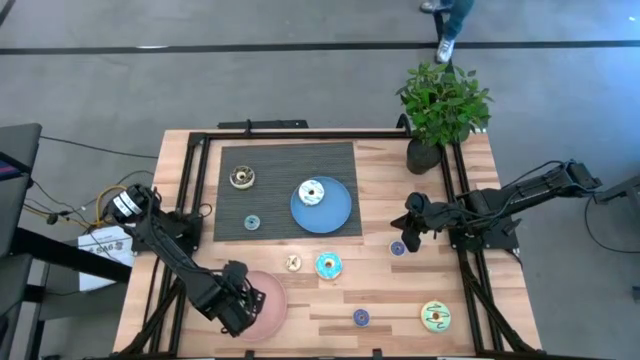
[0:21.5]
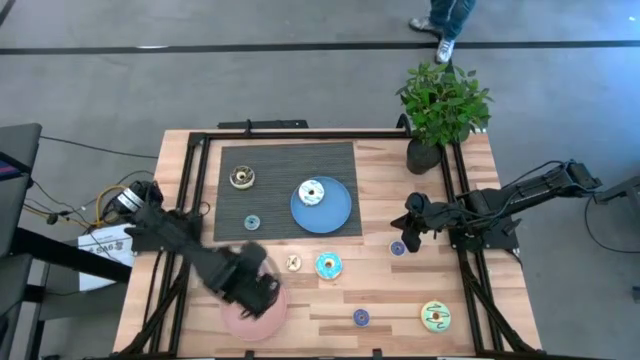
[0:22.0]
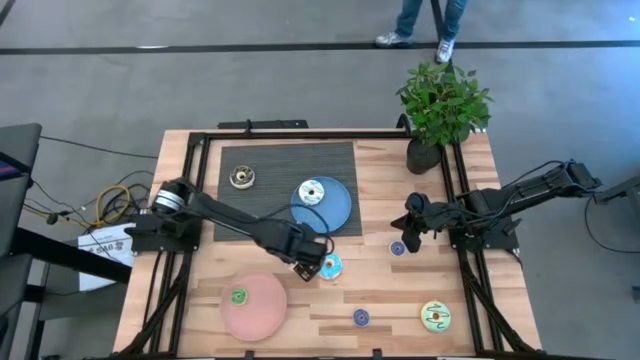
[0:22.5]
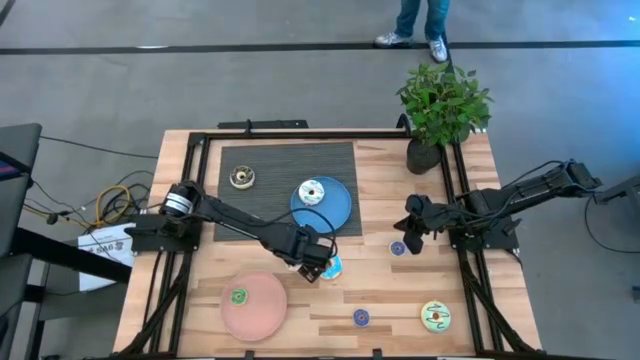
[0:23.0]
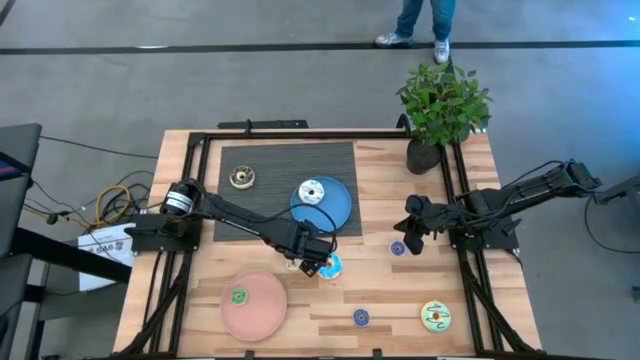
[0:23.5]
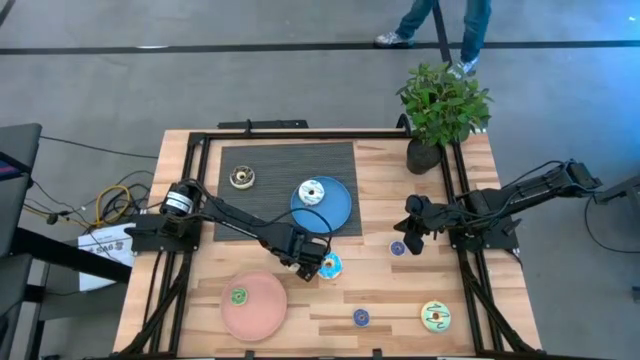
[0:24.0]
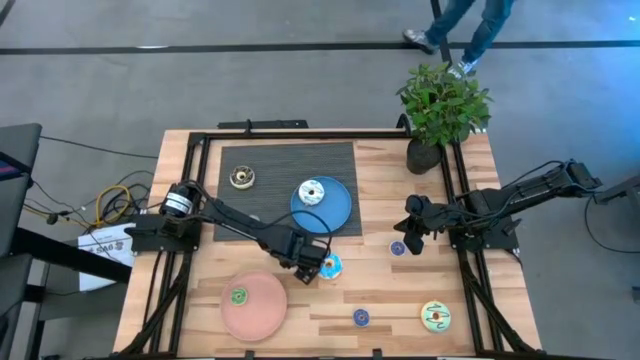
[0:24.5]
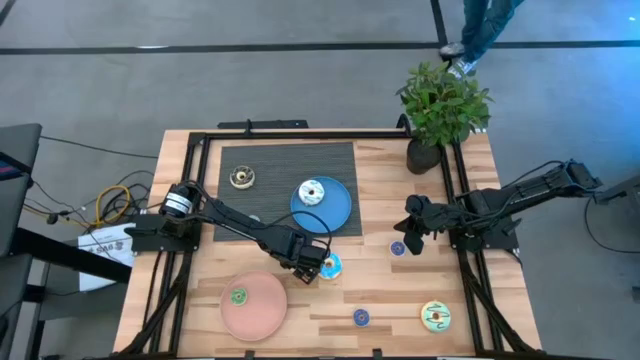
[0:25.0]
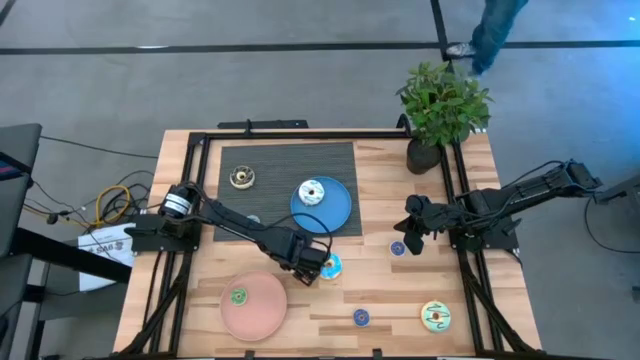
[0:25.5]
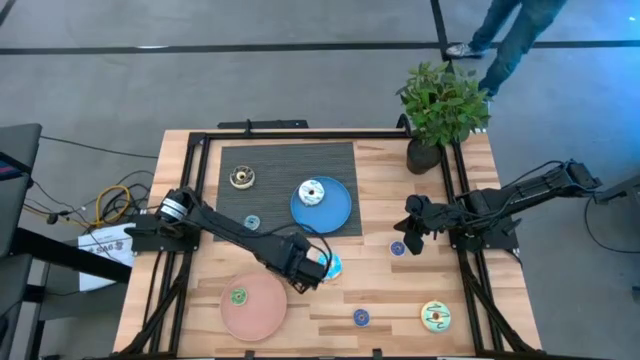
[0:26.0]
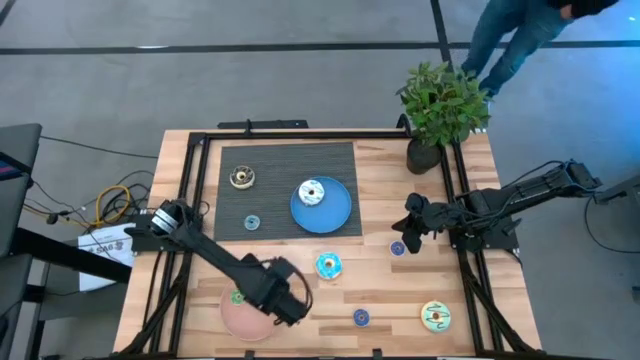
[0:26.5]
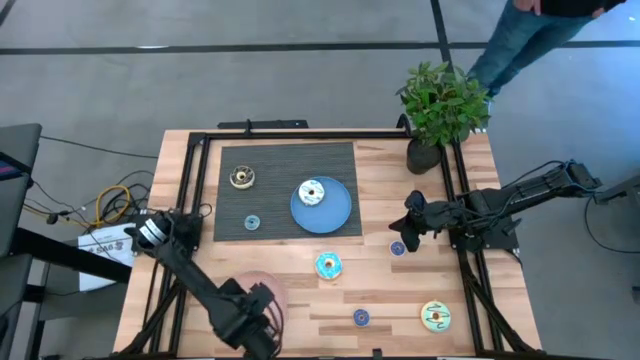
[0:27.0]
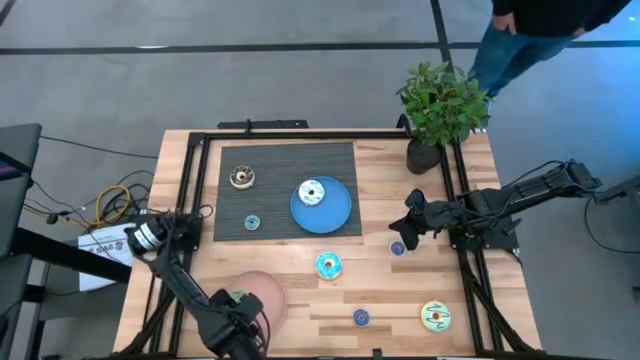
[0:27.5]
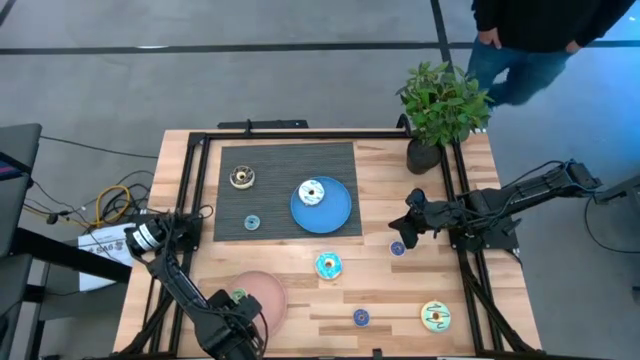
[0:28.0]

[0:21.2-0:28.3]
Task: Pick & Place donuts
Put the small white donut on the pink plate

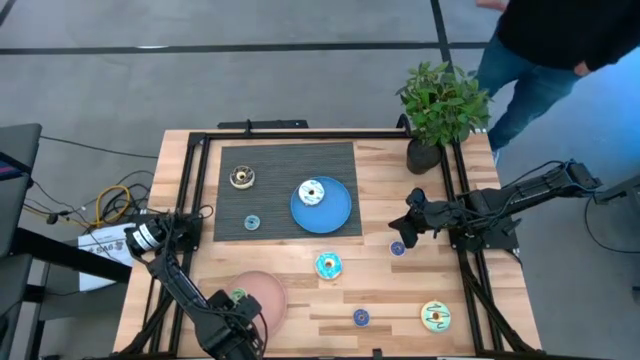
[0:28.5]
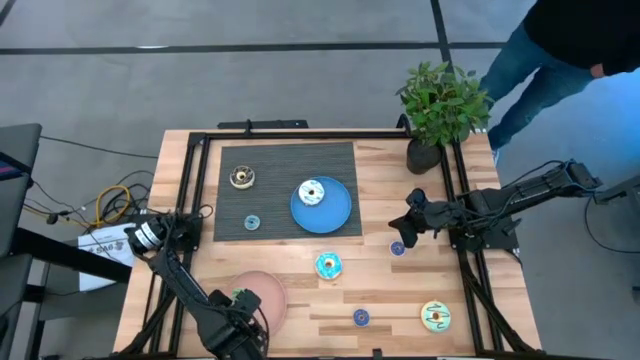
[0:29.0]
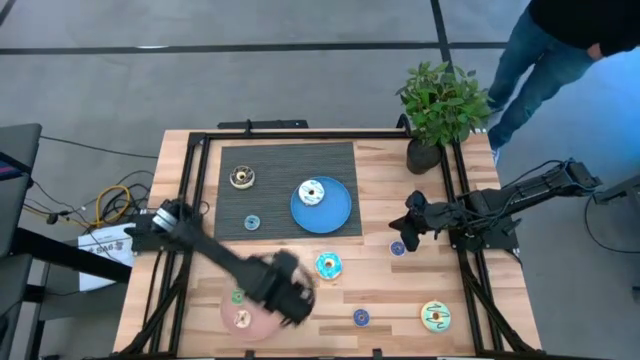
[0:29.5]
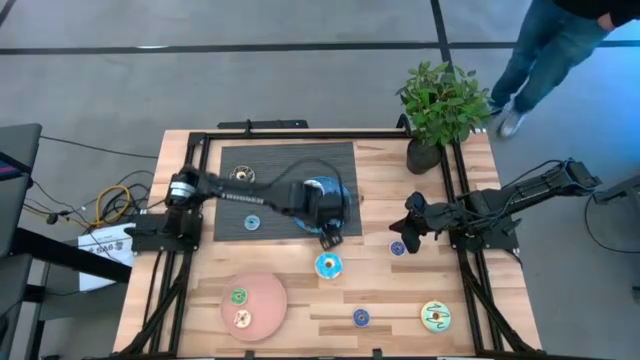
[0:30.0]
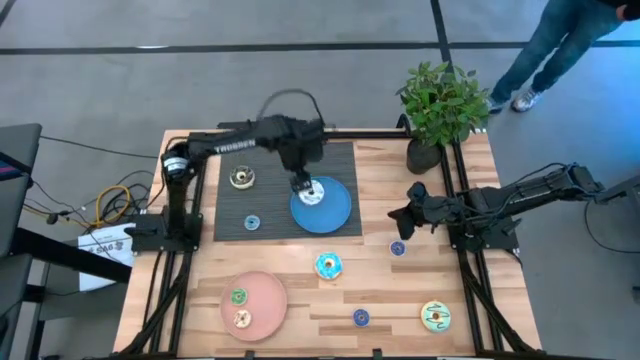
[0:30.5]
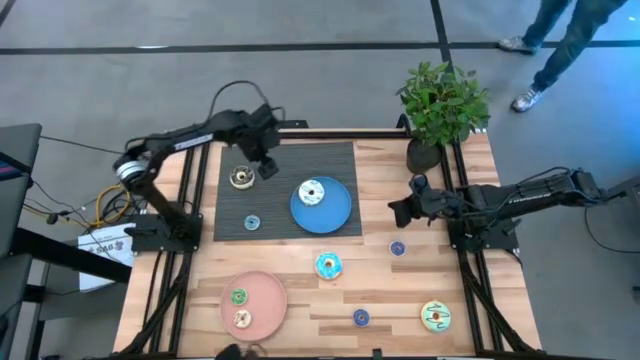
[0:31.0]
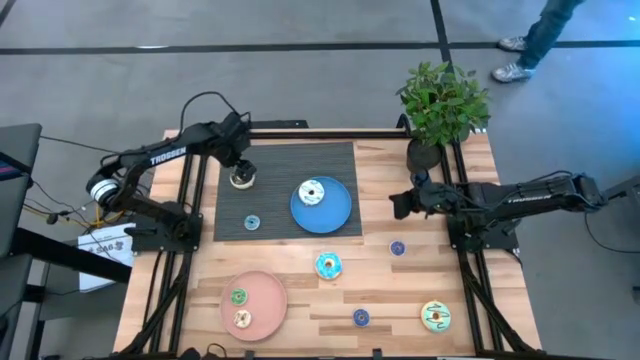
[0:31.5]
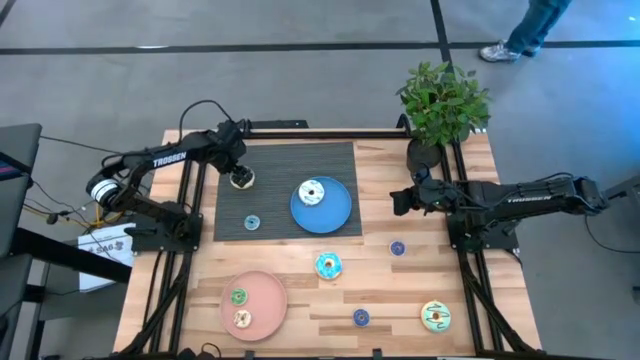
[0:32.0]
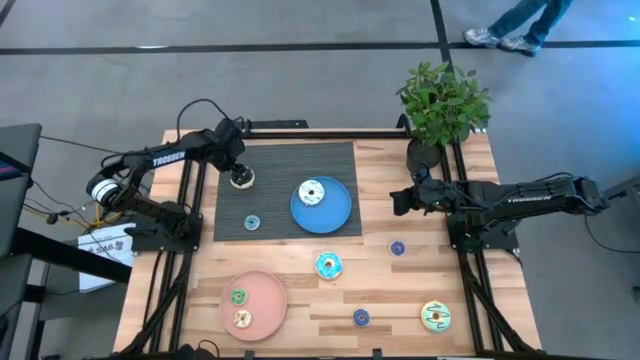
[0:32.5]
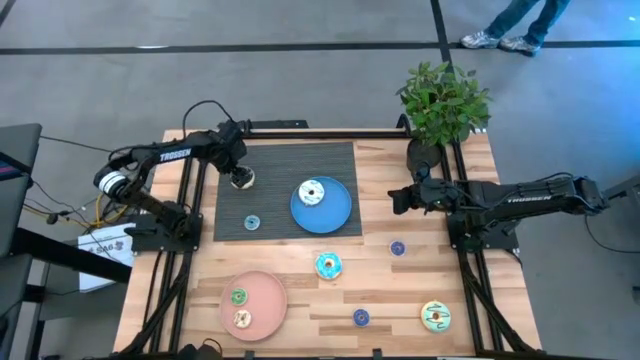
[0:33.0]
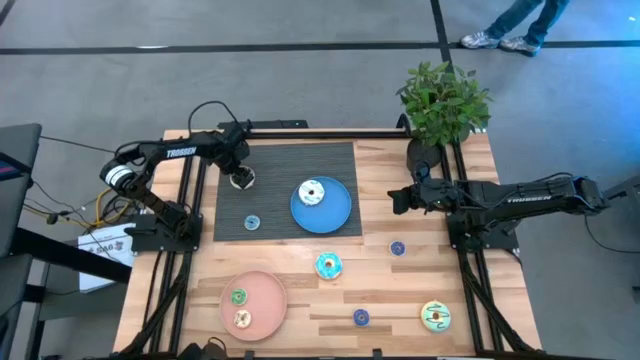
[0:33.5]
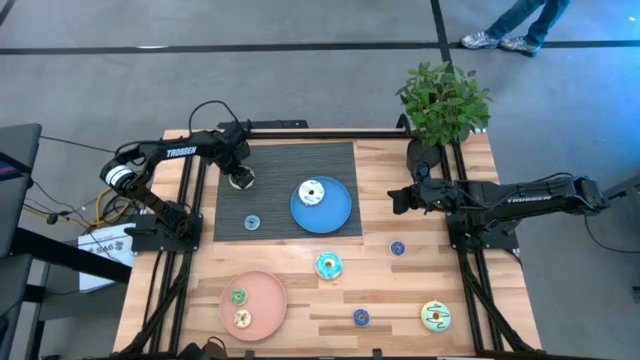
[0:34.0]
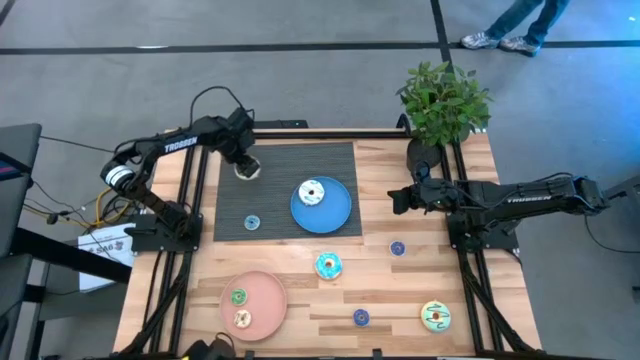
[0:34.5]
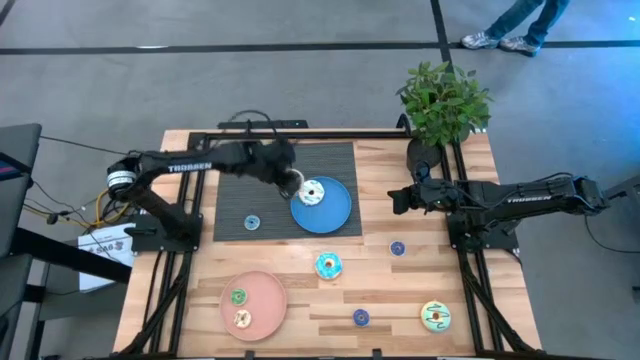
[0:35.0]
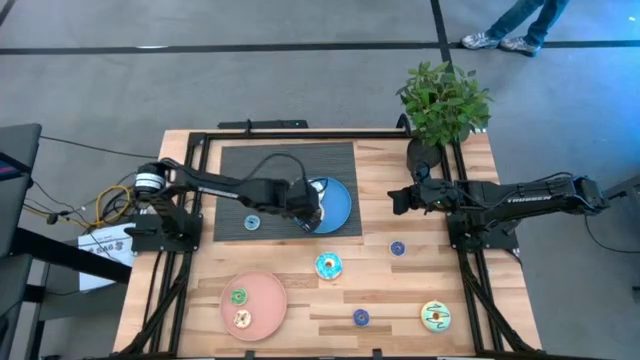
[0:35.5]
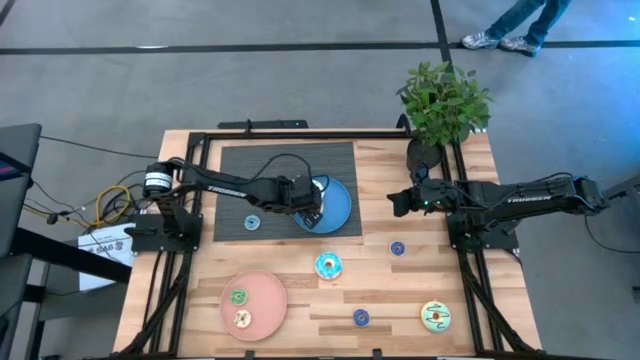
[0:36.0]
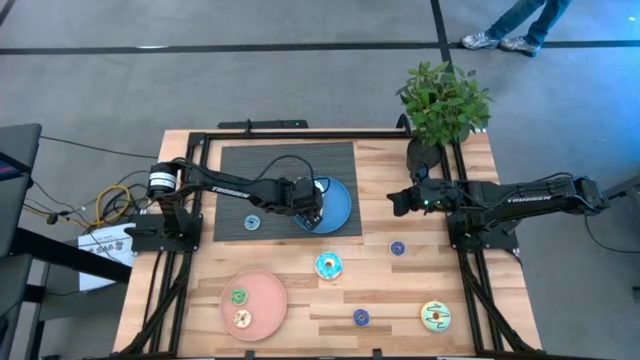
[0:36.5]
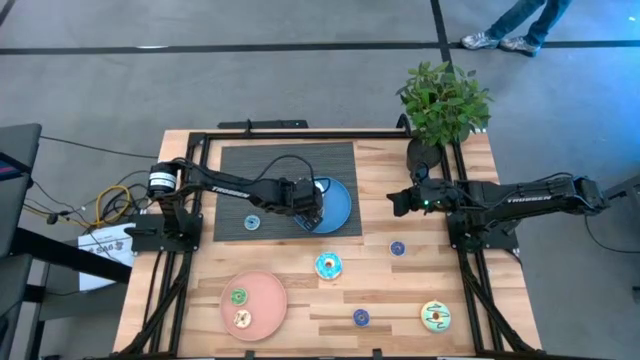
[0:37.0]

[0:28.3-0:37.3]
Put the large brown donut on the blue plate

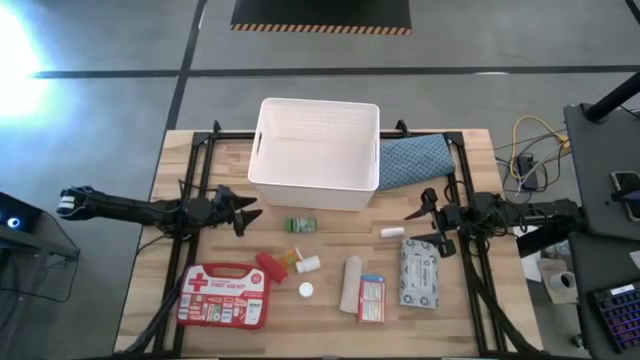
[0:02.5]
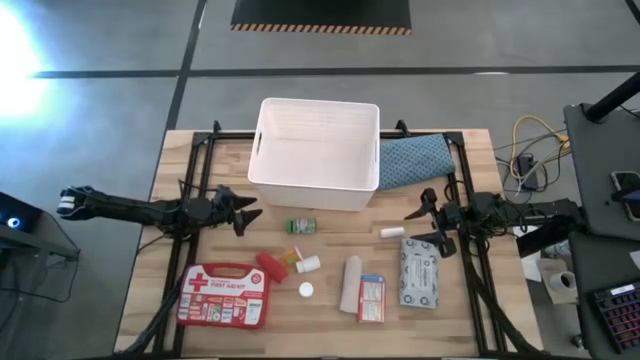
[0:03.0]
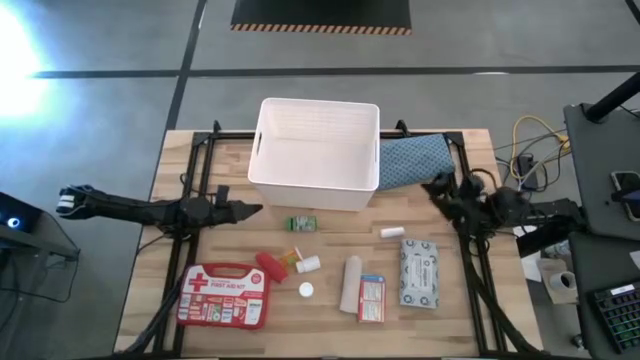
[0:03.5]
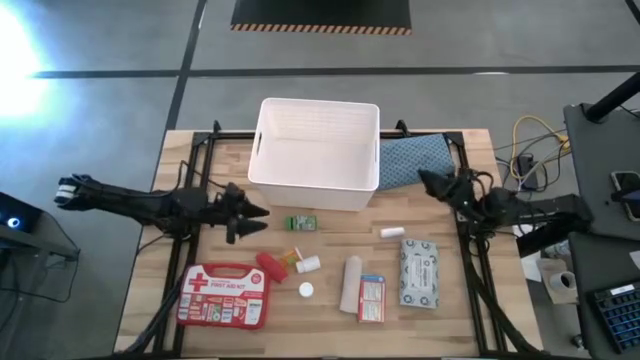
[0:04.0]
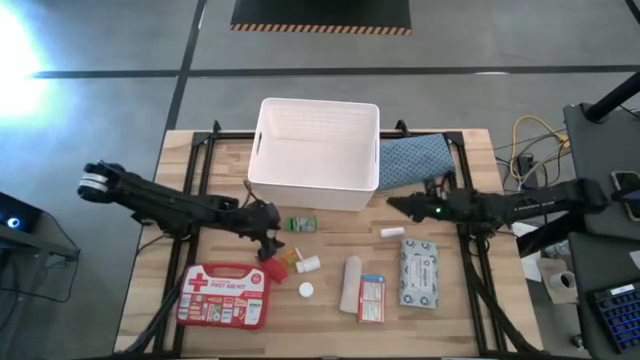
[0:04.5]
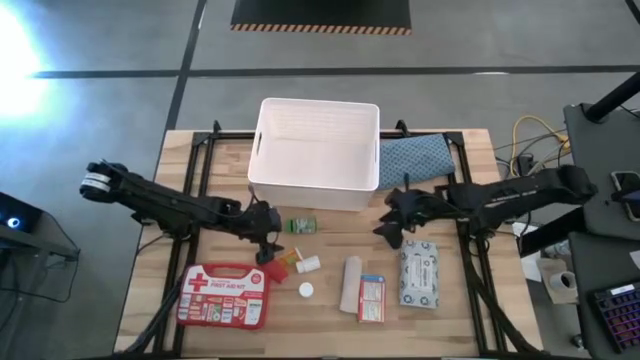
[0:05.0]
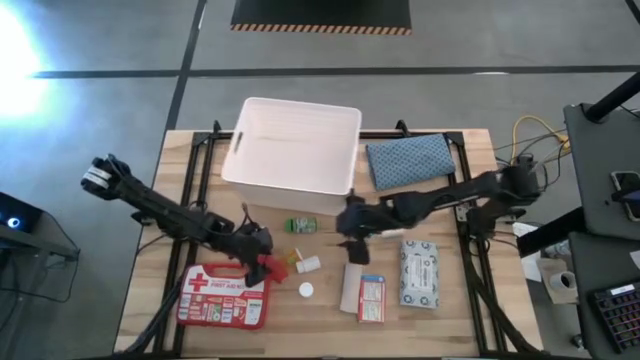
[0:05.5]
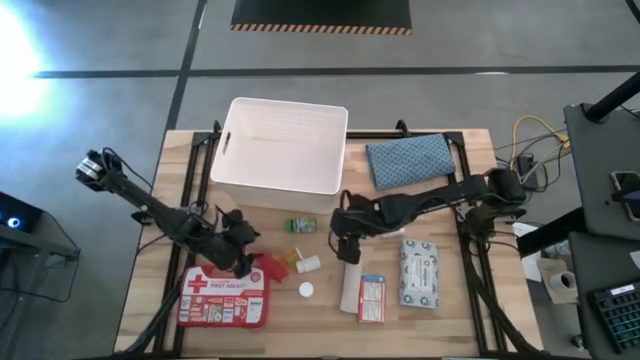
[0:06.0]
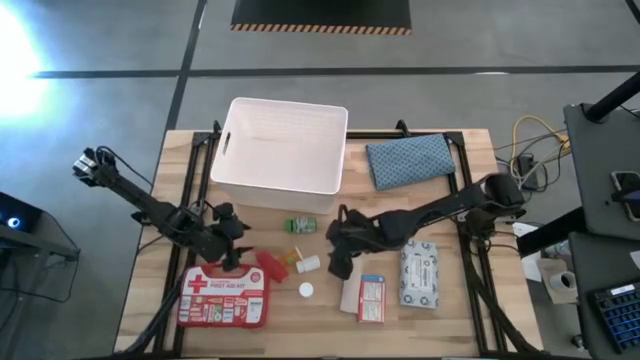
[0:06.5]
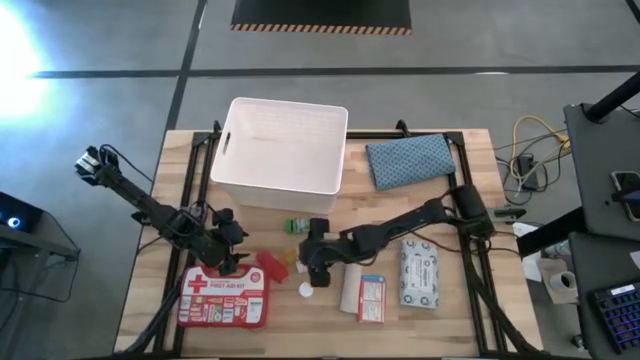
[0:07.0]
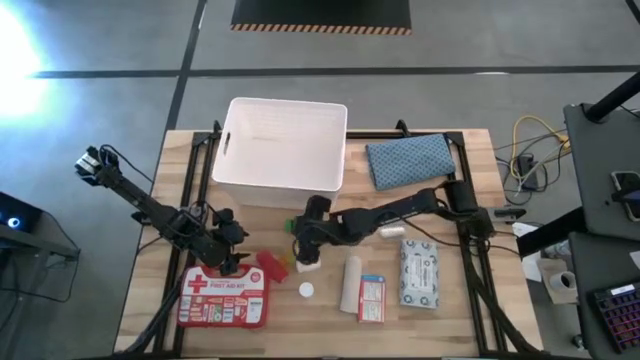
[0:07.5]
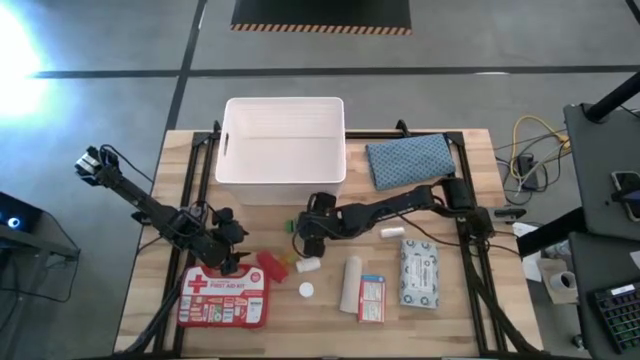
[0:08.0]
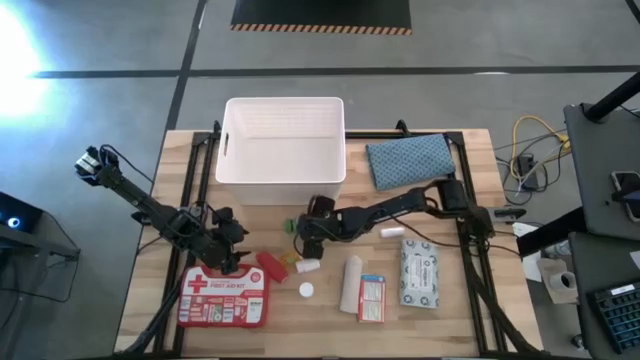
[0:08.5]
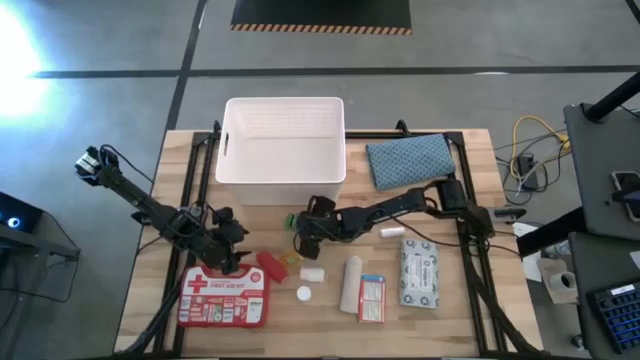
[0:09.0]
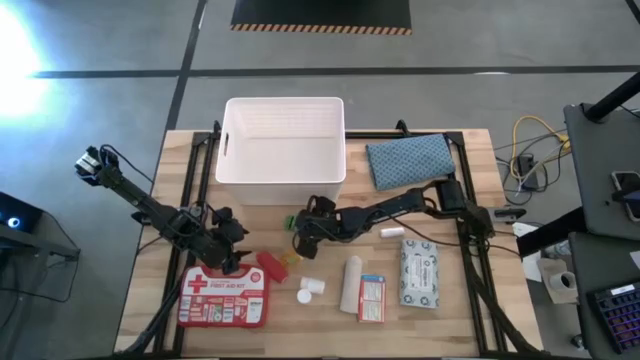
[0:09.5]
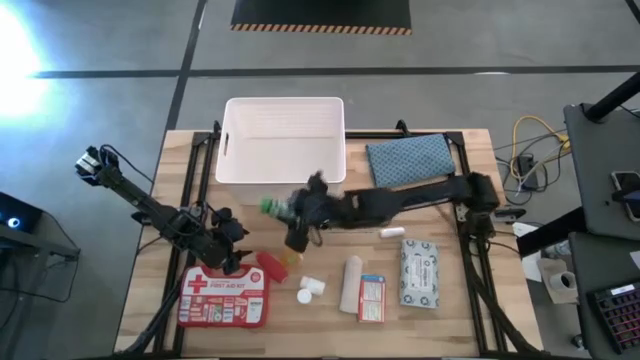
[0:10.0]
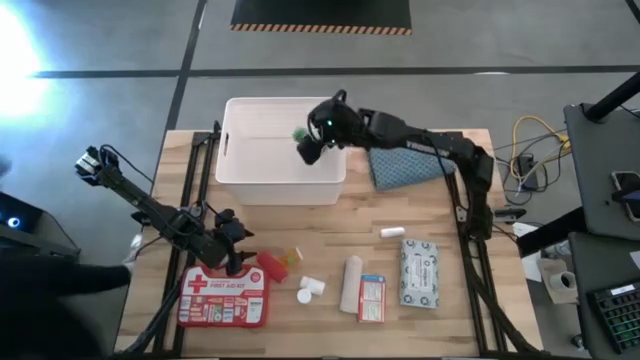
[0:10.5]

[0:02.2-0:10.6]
Task: Pick & place medical supplies in basket/bin
Put the green pill bottle into the white bin
